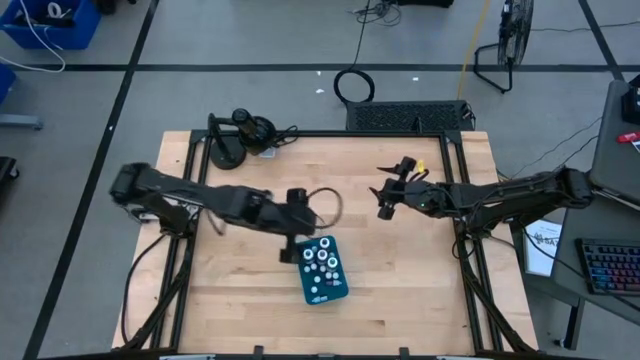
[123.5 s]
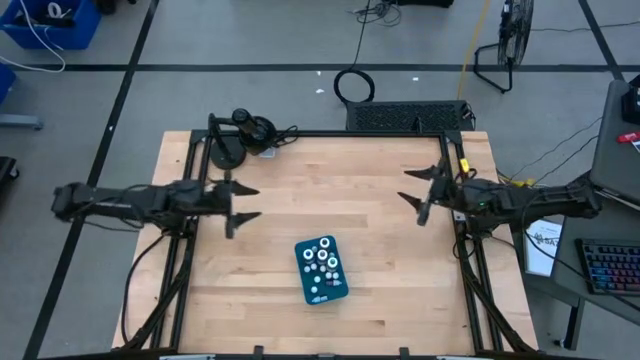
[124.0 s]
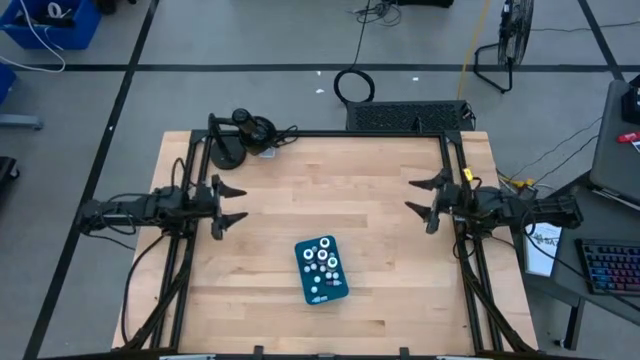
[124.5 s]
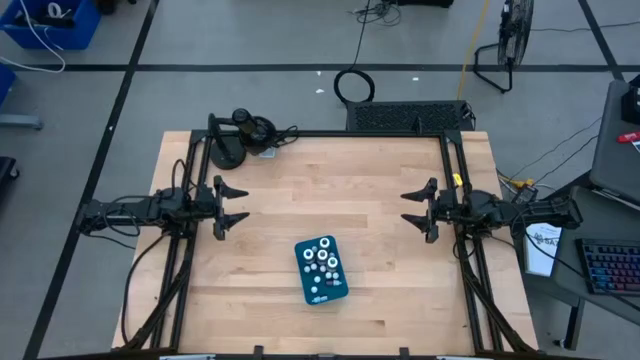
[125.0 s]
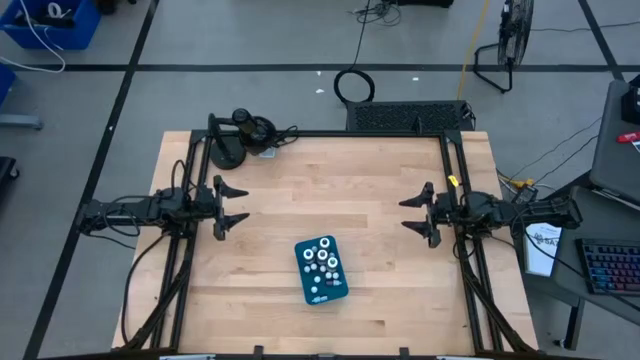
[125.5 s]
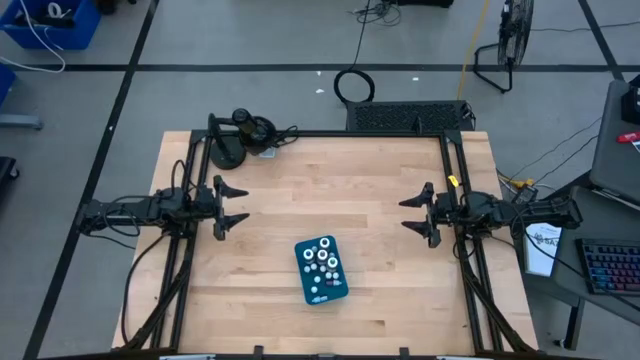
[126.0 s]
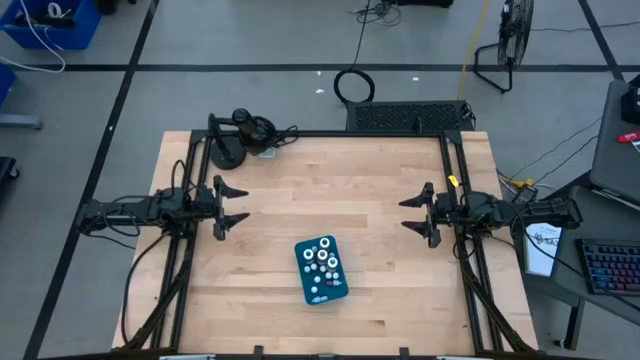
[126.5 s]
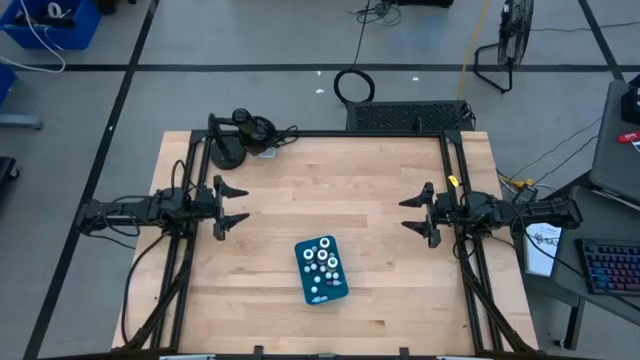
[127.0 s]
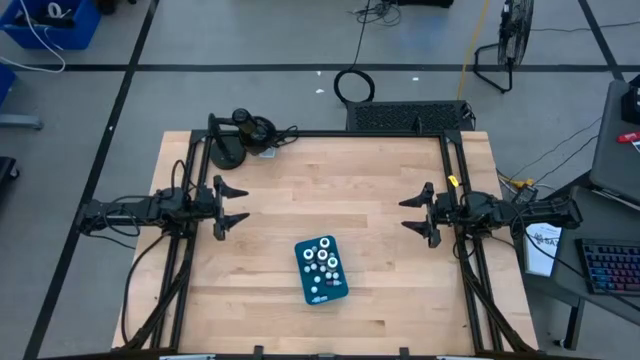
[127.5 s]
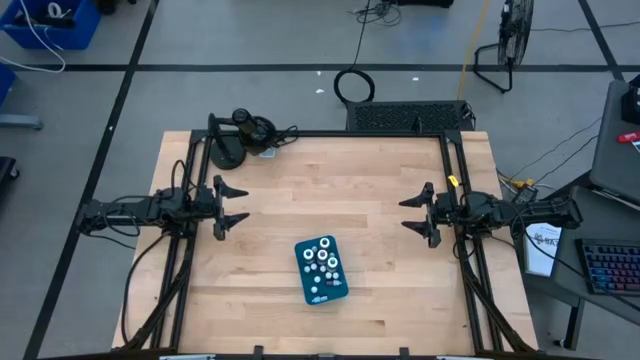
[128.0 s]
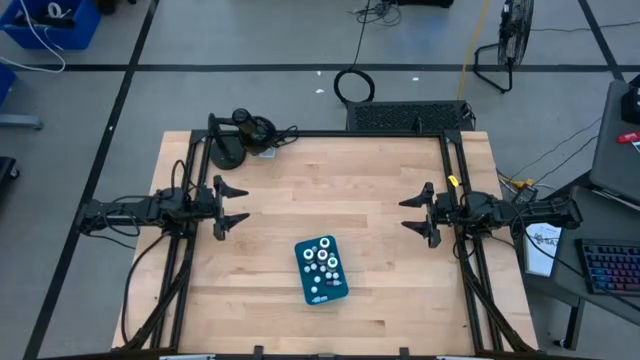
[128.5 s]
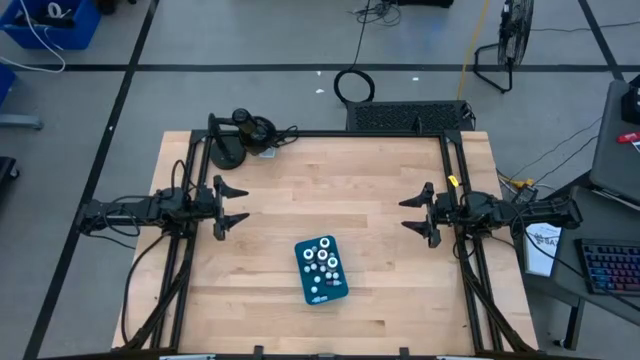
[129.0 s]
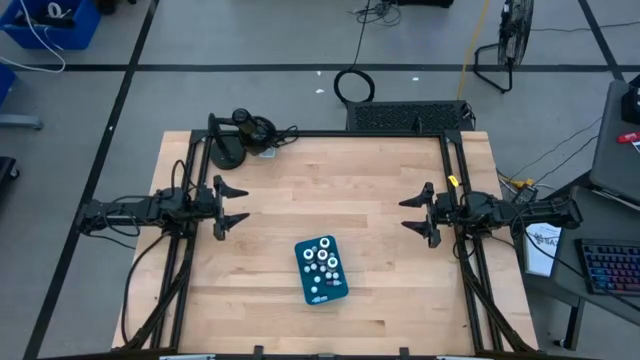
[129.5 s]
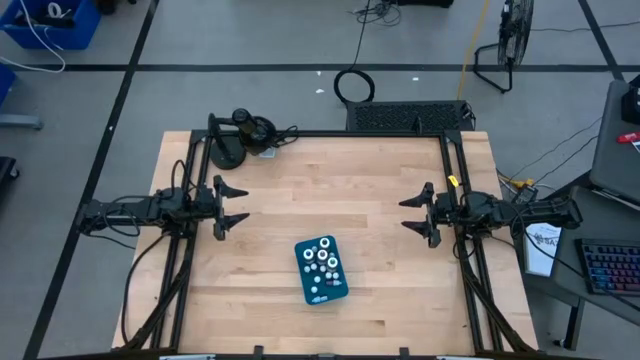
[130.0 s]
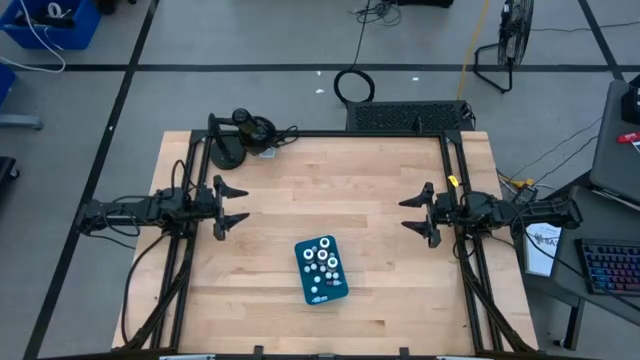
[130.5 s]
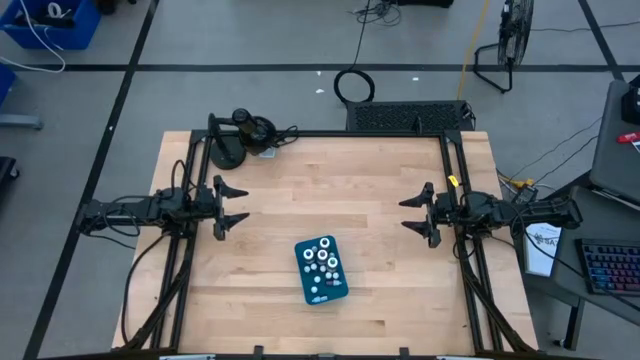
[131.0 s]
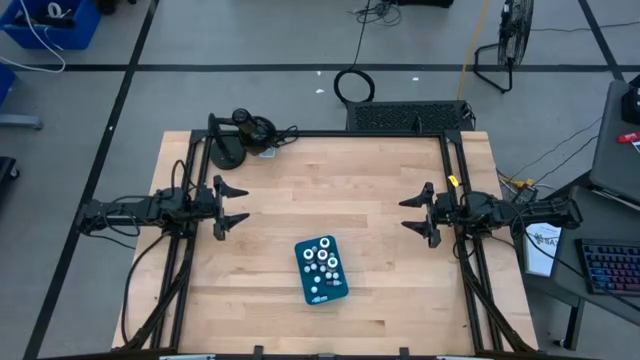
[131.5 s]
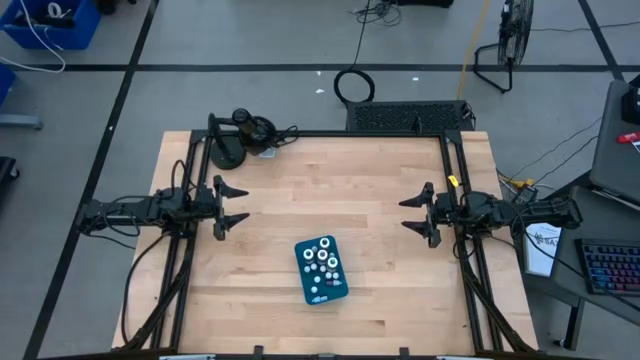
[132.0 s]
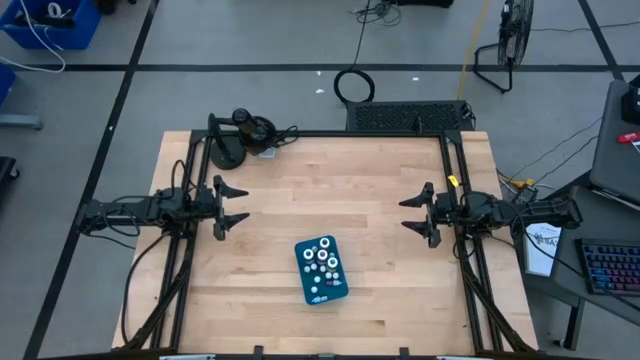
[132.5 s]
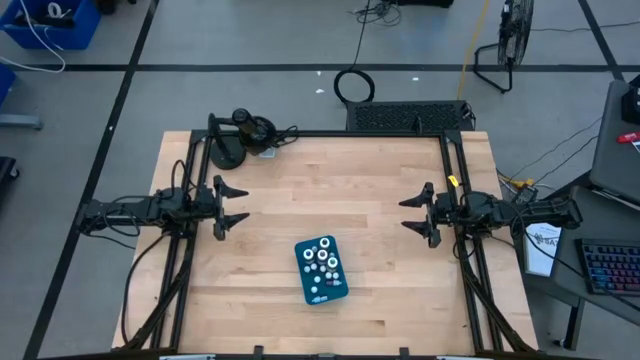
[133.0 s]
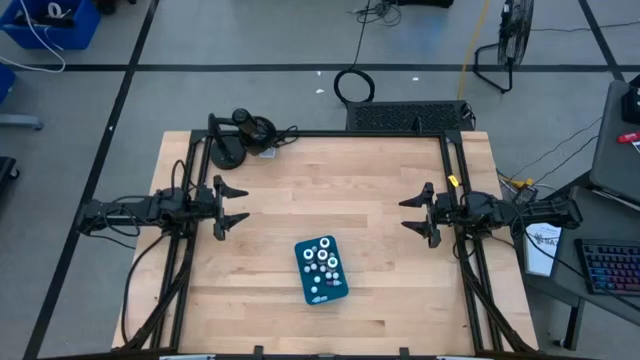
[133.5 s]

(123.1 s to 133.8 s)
Task: Pick & Place food coloring
Return to Home Position

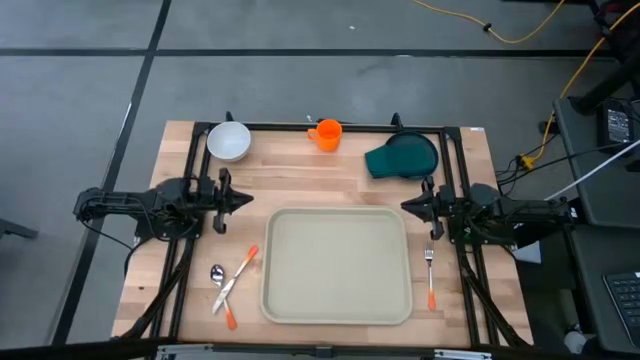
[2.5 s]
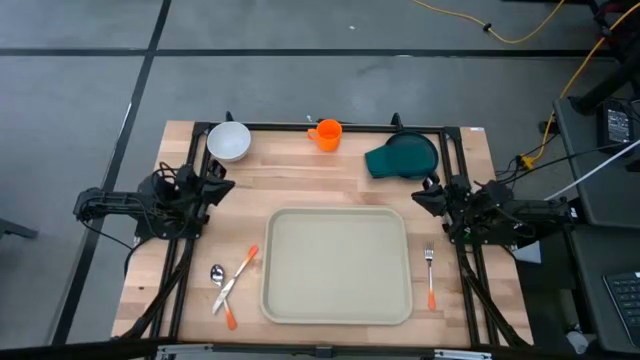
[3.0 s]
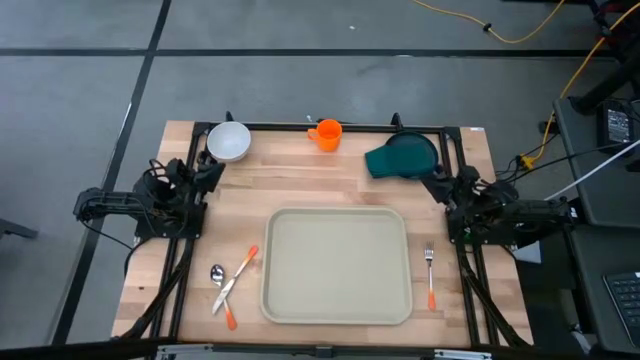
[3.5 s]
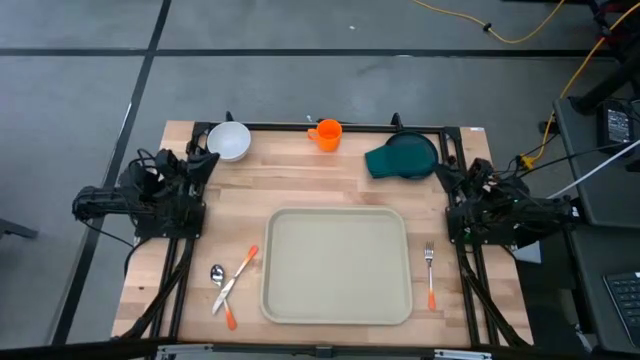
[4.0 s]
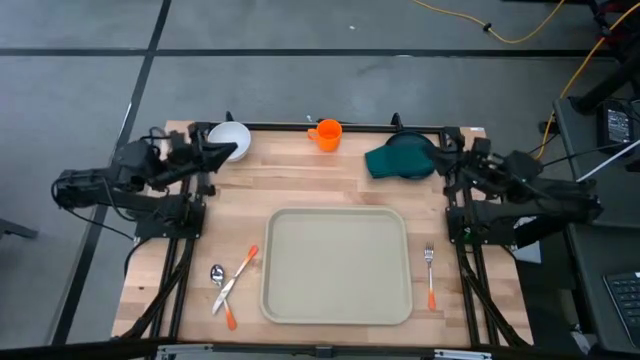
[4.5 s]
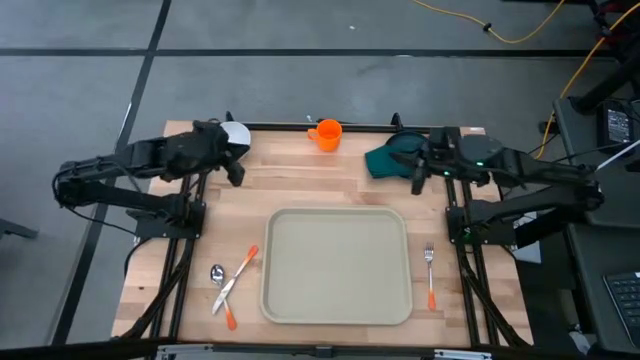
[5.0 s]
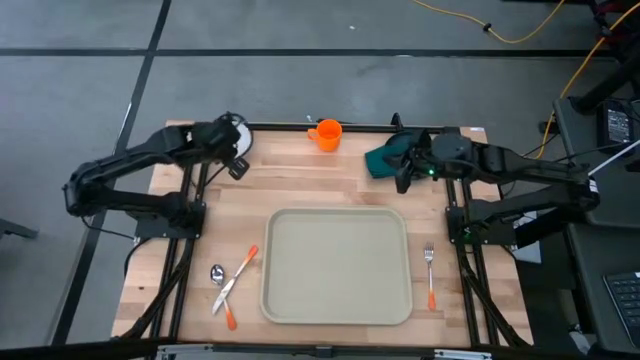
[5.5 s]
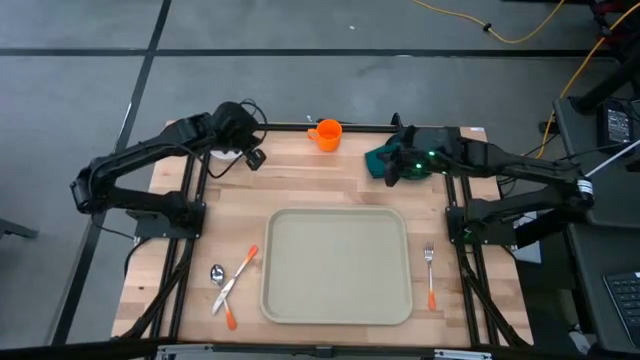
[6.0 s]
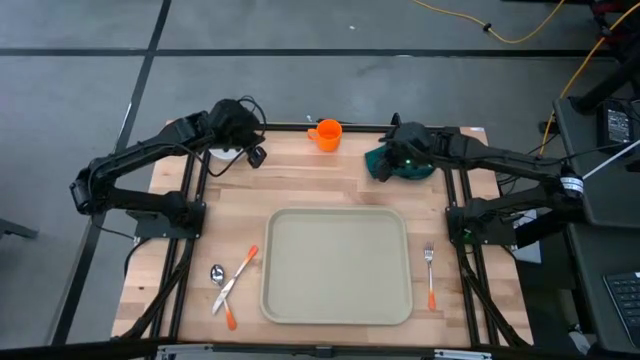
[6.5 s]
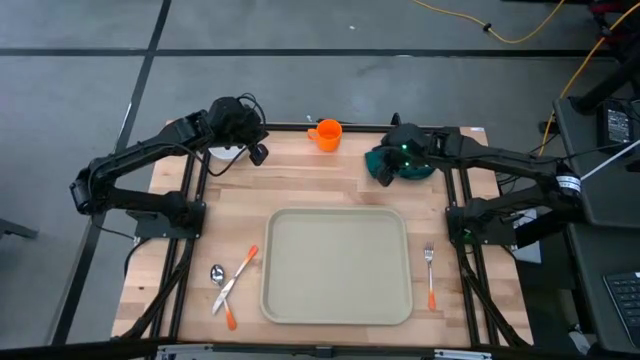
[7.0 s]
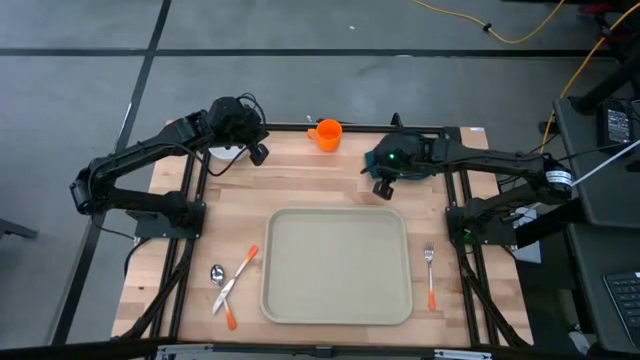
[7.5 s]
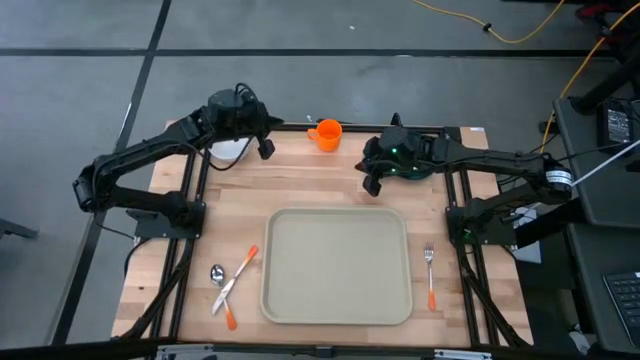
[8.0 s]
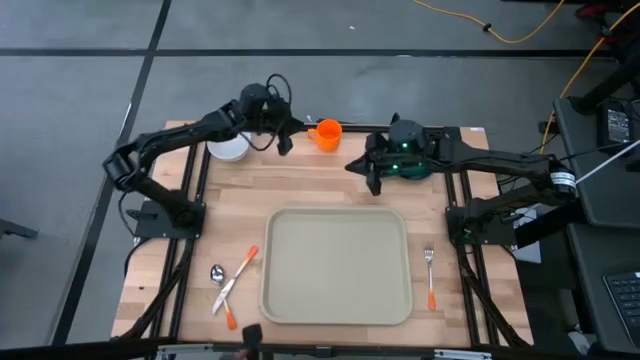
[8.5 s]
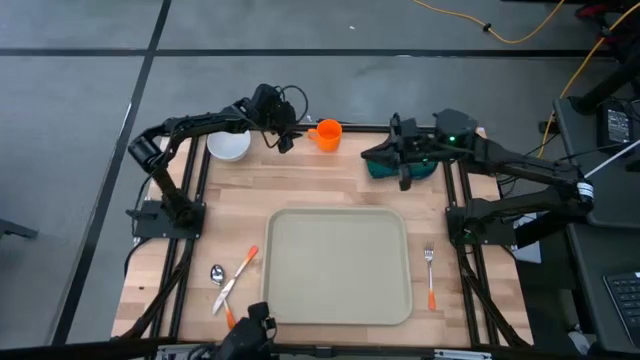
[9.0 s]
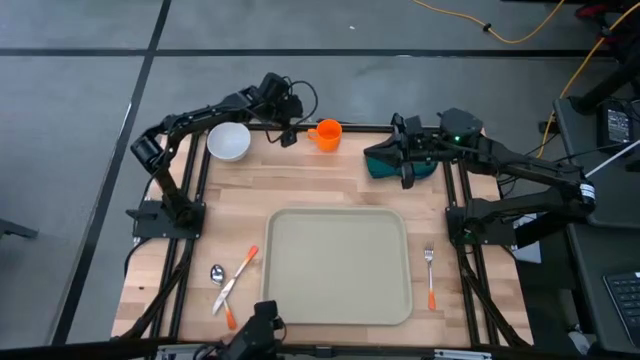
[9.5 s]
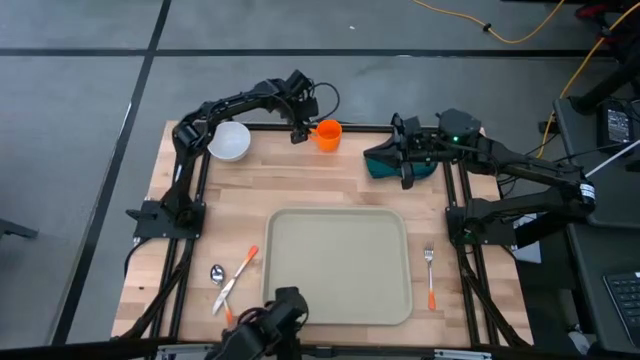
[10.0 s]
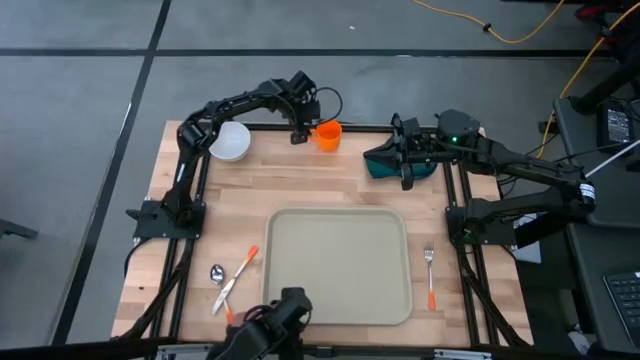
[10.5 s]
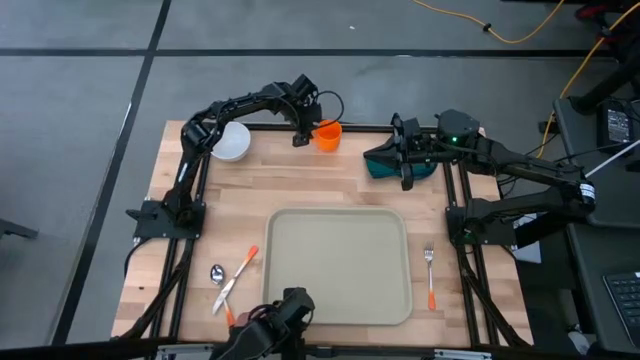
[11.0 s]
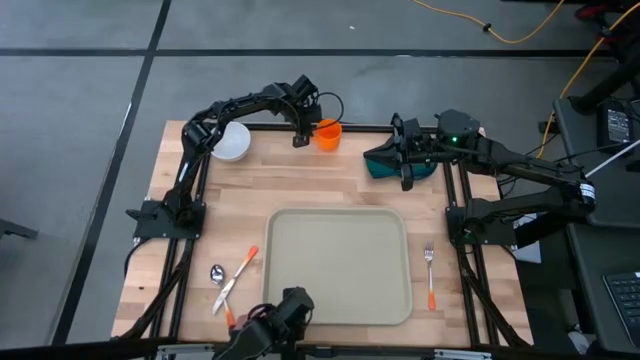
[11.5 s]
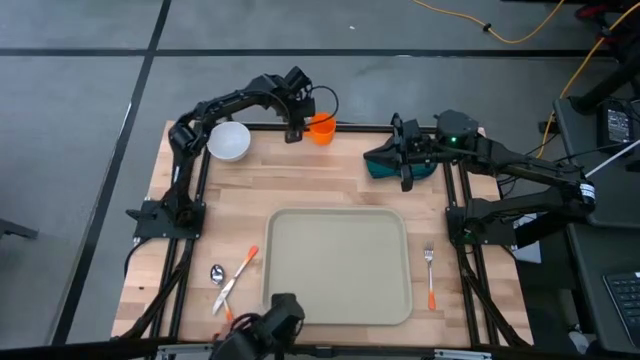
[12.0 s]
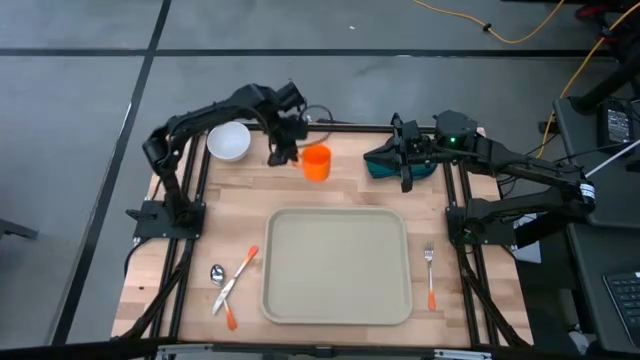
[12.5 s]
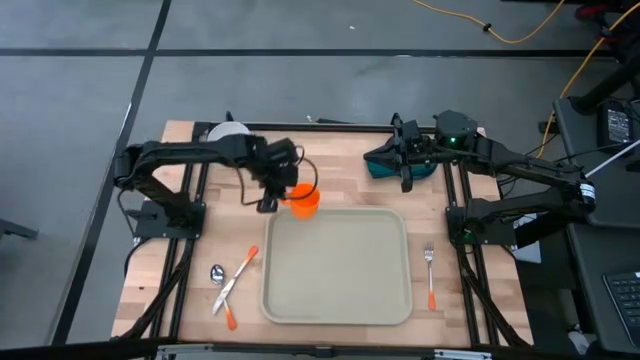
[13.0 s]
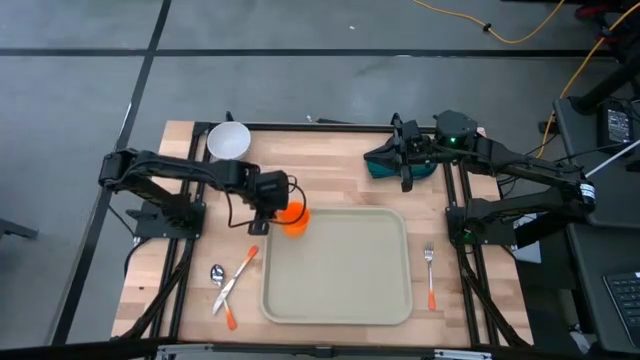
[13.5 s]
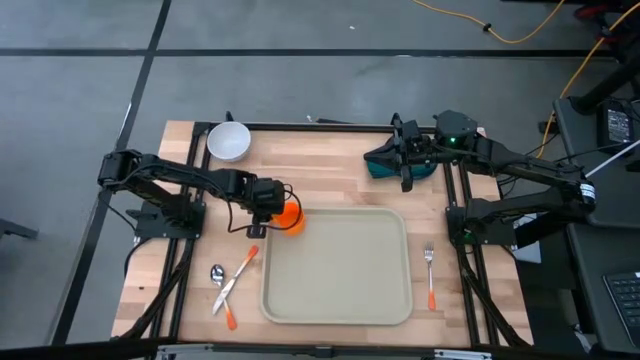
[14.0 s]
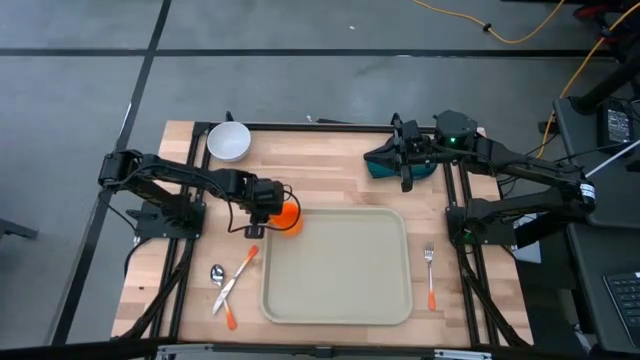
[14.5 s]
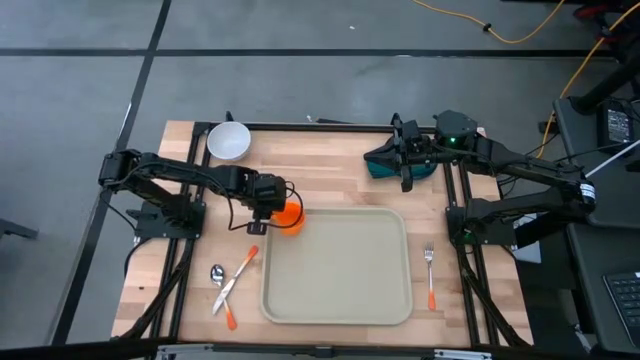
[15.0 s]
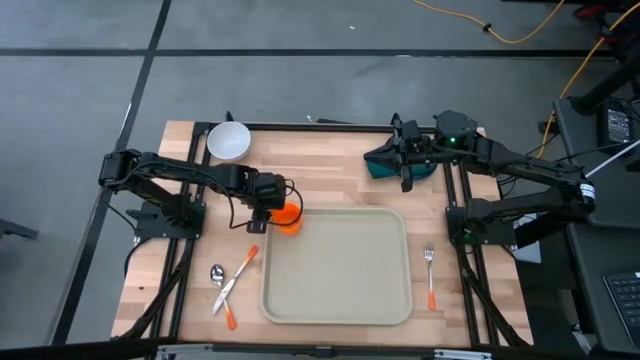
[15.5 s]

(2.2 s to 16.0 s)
Task: Set up tray
Put the orange mug on the serving tray
